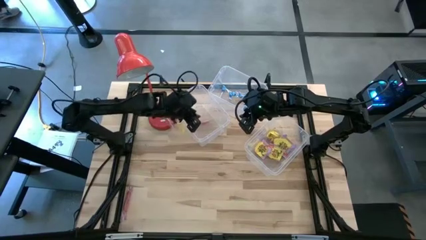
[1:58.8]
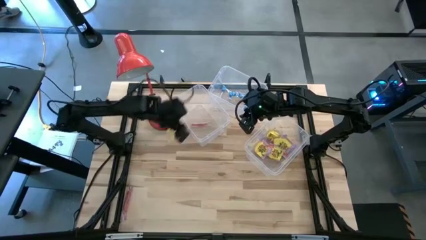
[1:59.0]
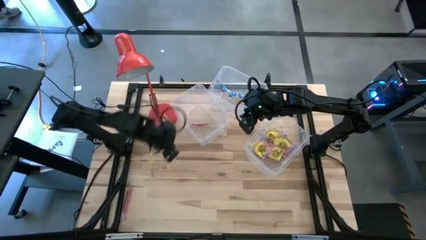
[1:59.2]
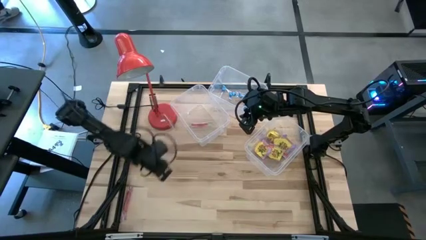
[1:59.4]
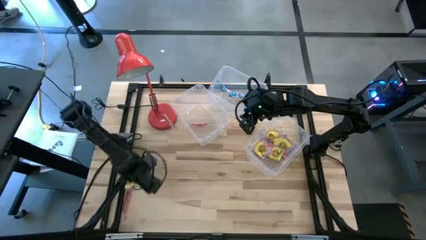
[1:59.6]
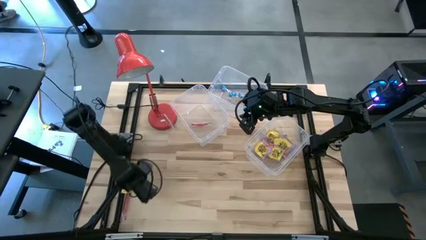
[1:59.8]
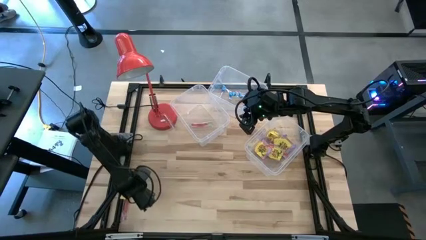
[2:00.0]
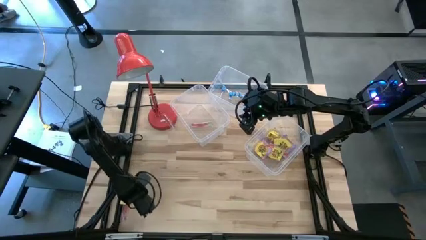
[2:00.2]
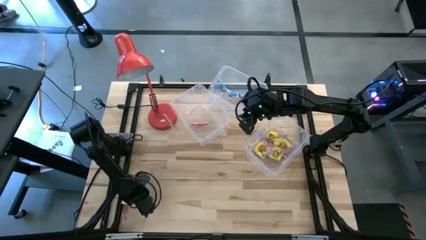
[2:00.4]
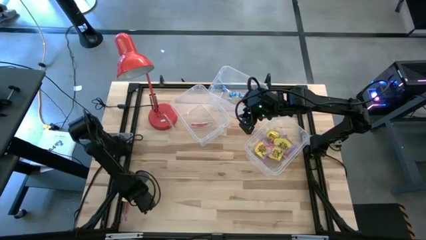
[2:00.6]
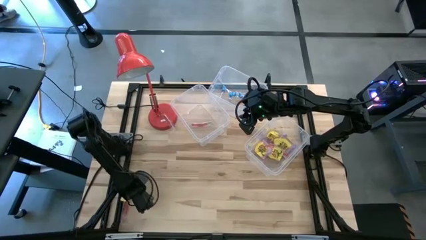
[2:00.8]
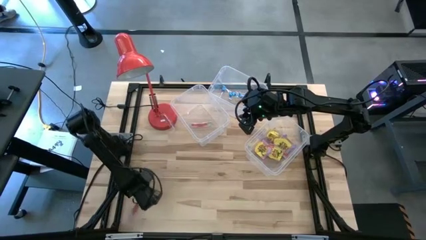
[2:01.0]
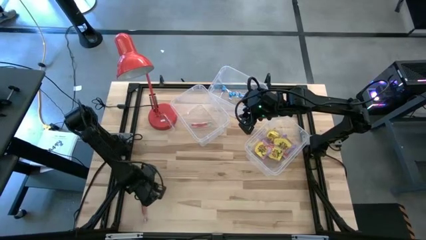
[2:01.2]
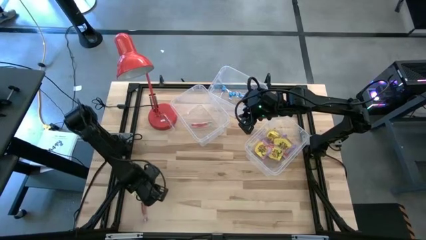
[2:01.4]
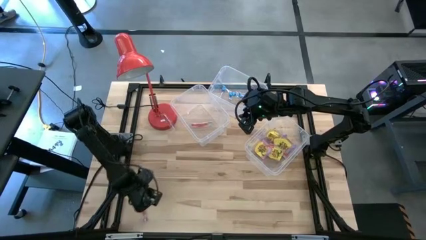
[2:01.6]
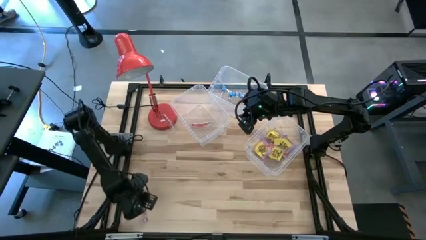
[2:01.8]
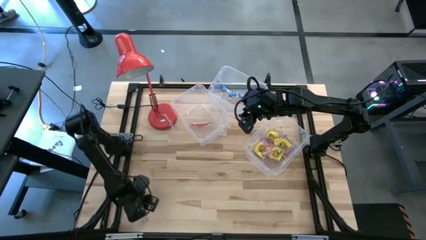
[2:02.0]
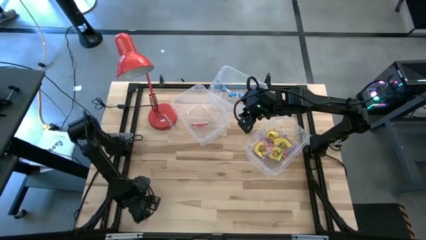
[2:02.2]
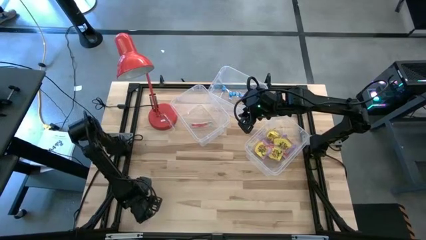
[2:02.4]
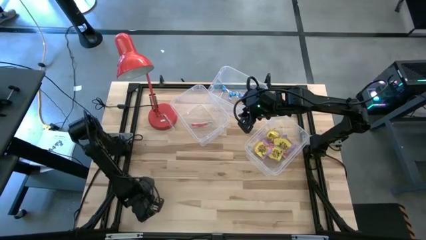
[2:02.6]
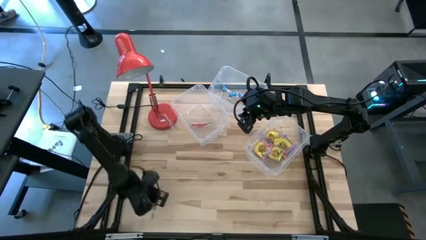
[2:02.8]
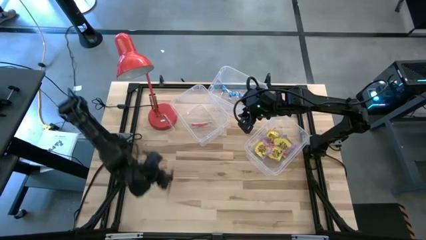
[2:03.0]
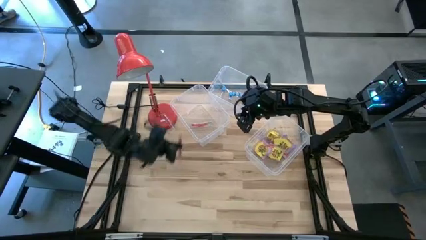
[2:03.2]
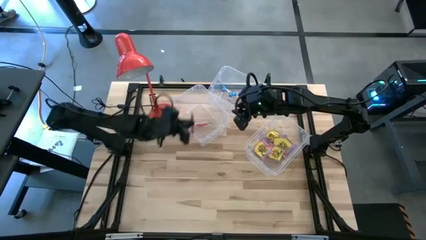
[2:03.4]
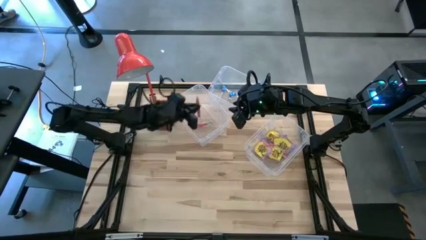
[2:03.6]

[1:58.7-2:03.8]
Task: Sort candy
Put the red candy into the left transparent bin

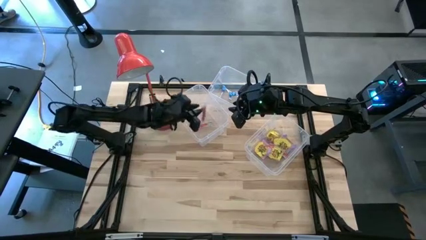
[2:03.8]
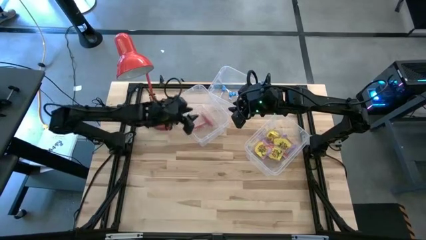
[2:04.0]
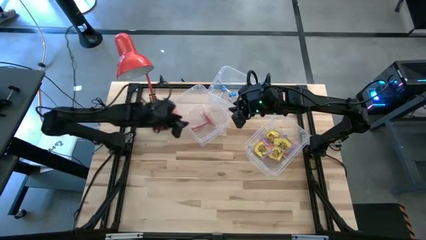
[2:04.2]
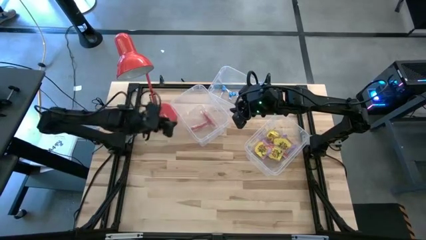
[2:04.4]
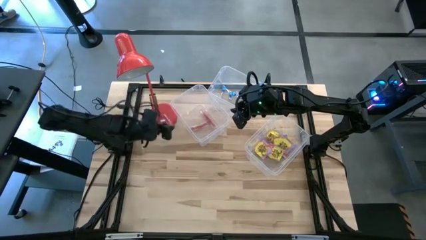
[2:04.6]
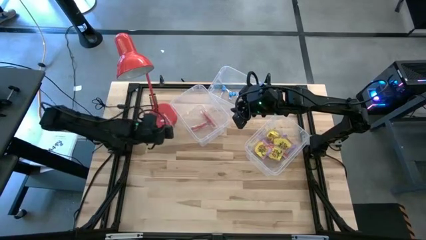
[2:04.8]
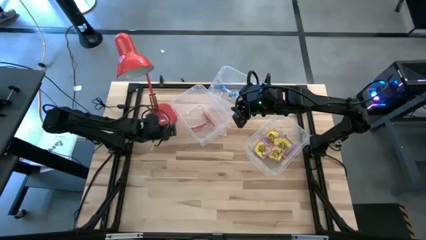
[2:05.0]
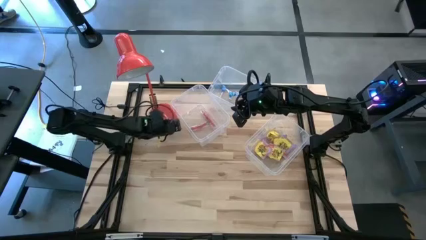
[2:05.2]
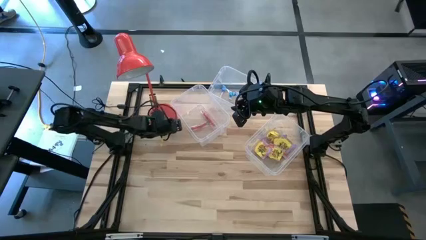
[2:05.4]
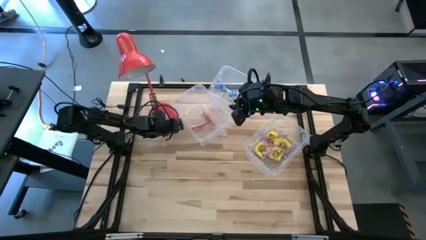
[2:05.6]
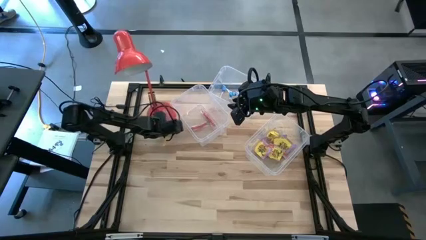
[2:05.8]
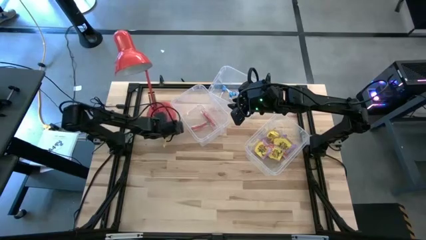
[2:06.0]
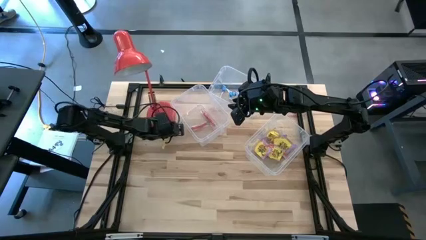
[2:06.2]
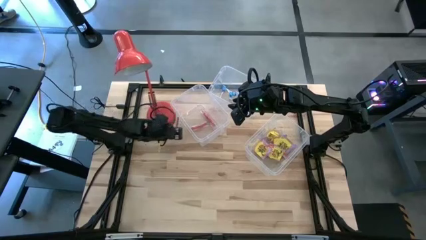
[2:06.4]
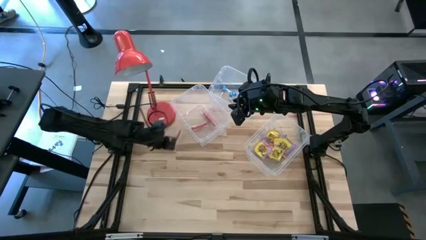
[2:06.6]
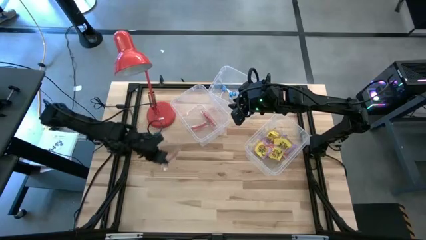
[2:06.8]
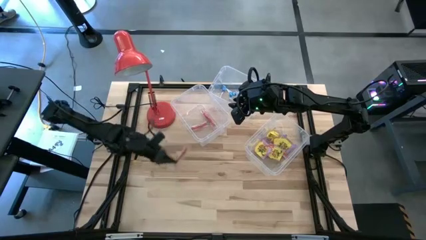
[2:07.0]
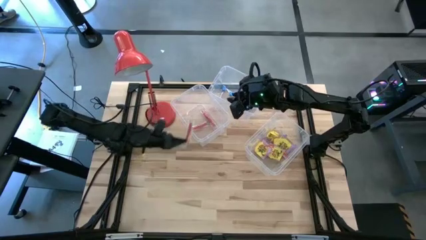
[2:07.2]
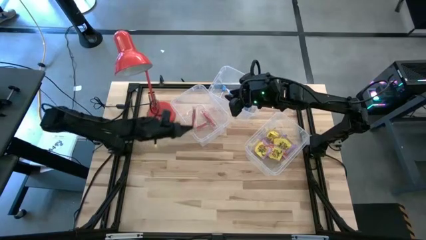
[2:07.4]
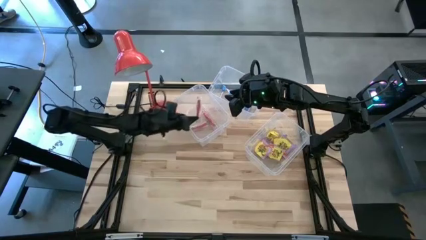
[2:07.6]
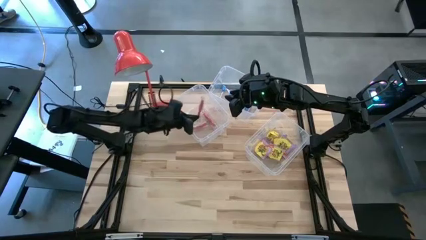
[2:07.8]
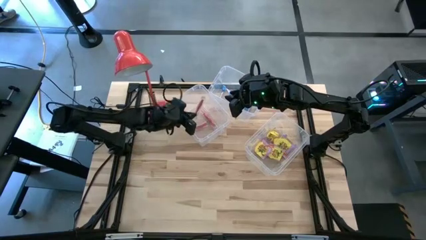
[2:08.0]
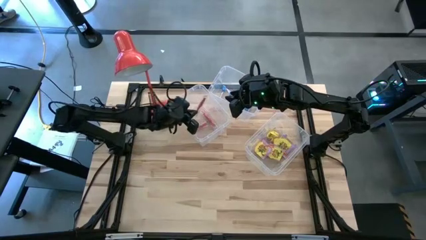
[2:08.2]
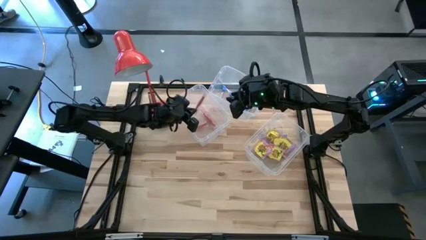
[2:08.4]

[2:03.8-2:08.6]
Put the red candy into the left transparent bin

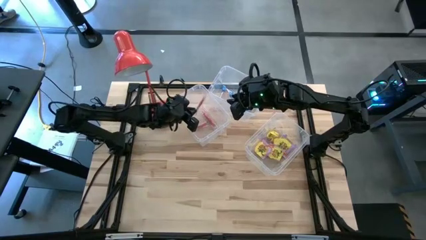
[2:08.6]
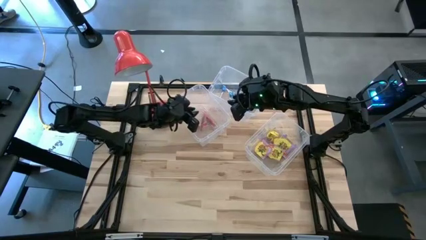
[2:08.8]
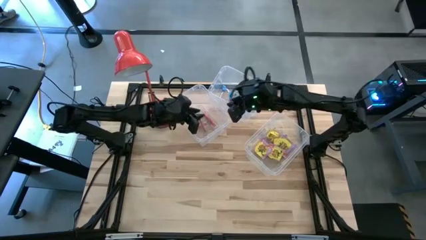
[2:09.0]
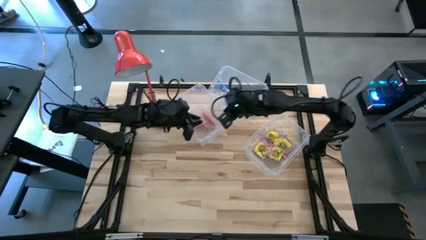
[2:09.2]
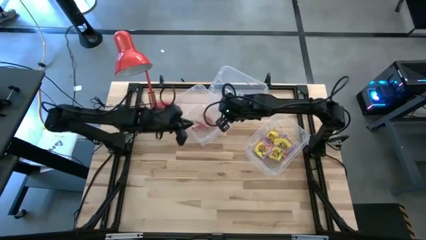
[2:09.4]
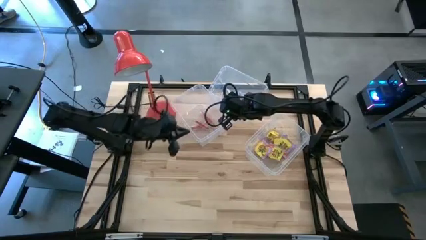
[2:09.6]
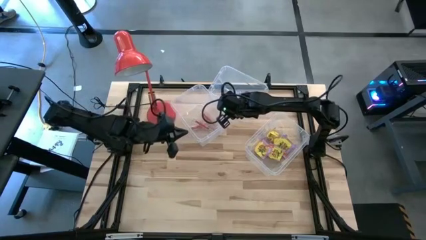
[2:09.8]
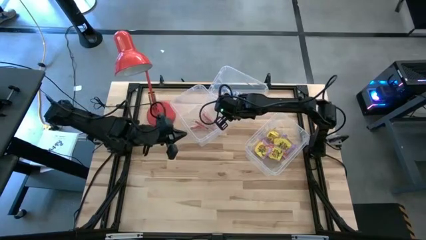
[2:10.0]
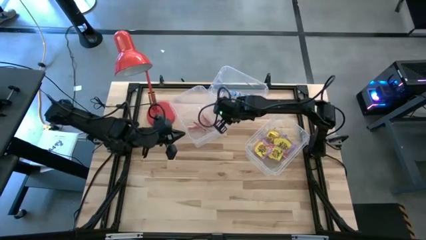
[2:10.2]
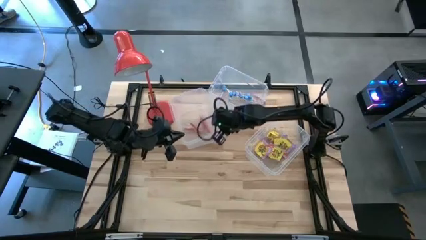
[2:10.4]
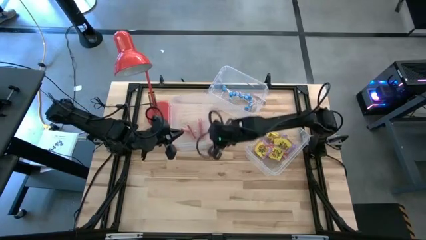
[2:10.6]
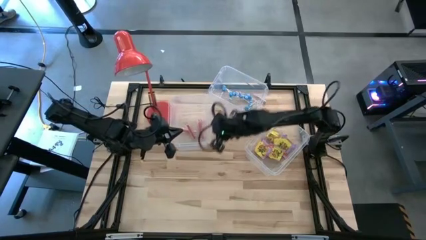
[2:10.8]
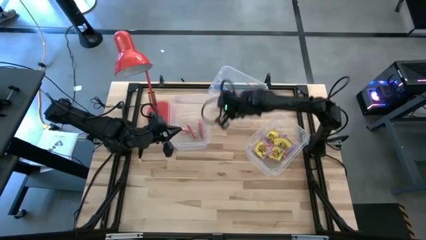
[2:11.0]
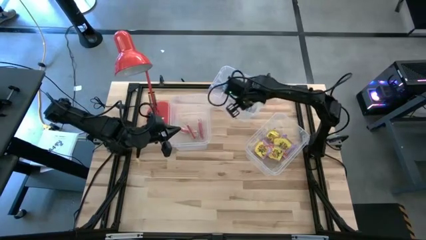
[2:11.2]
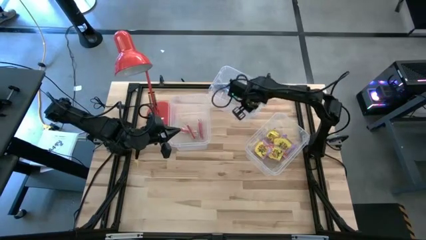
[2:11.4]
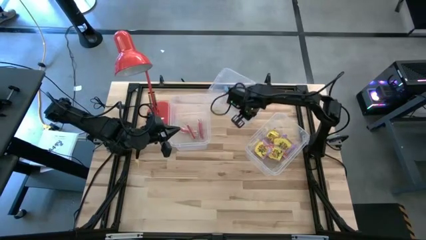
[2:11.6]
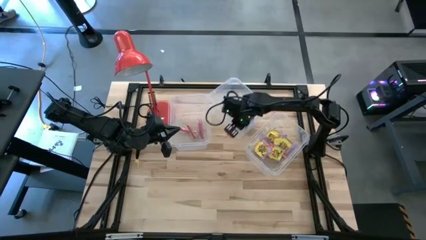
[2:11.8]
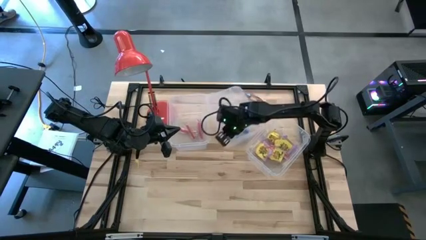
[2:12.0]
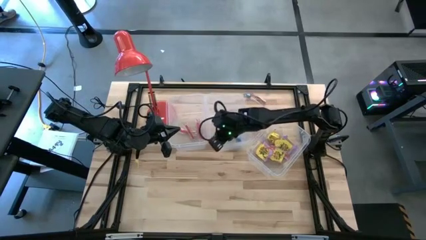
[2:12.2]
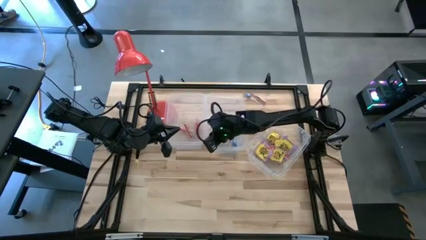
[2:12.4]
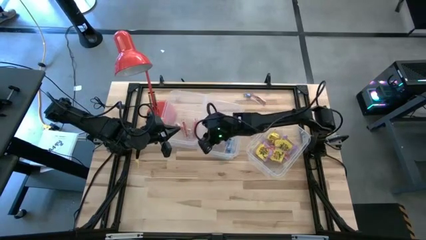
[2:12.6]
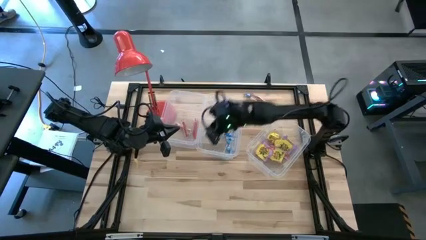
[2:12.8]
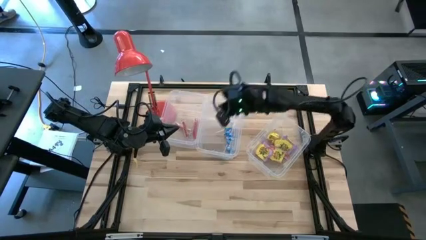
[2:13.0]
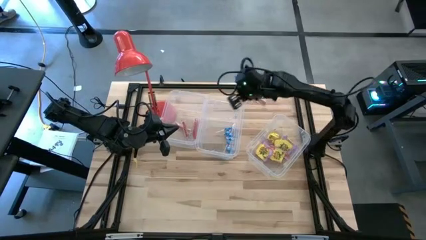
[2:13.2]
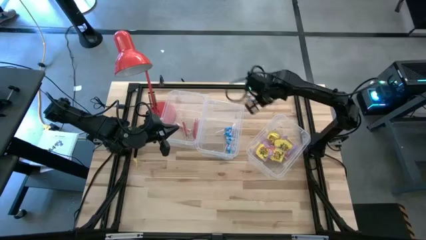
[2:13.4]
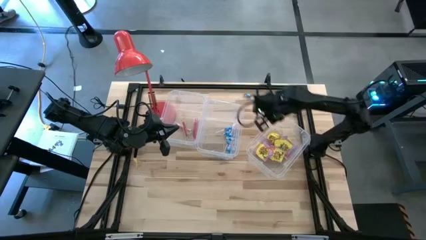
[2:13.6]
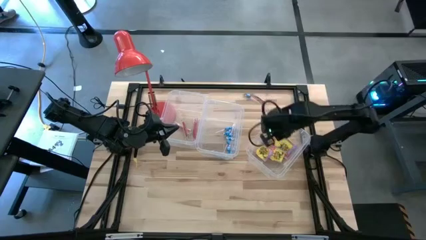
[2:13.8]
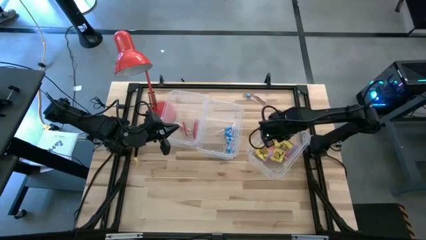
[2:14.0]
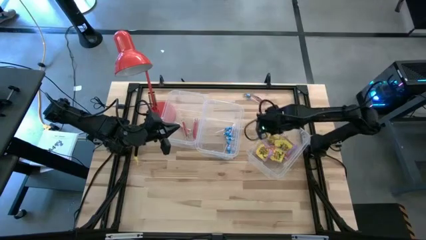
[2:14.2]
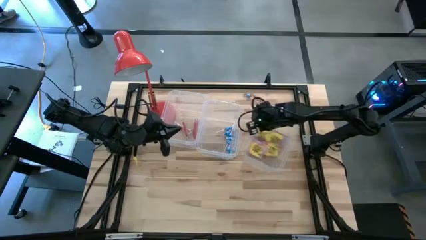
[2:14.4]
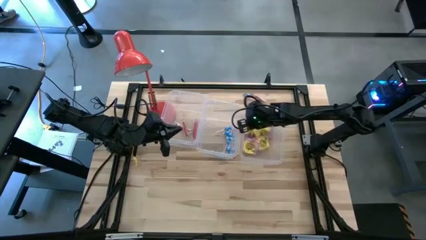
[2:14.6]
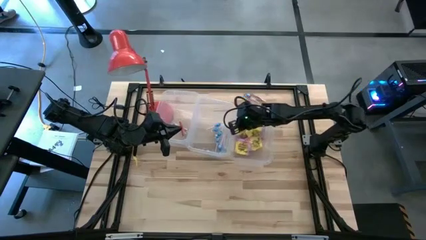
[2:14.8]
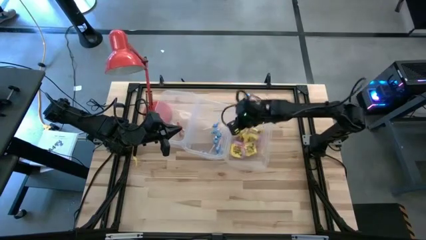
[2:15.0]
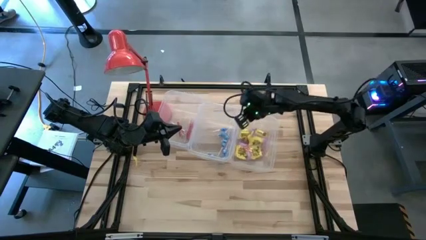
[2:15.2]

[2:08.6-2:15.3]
Adjust the transparent bins
